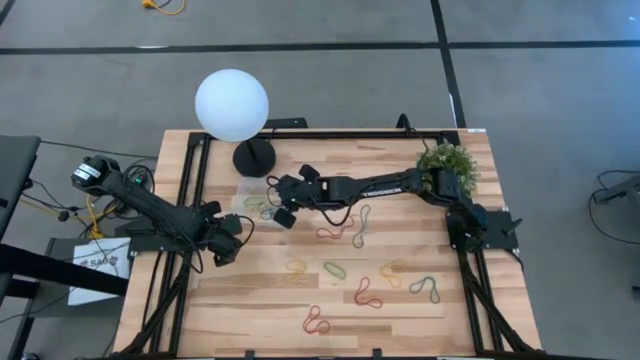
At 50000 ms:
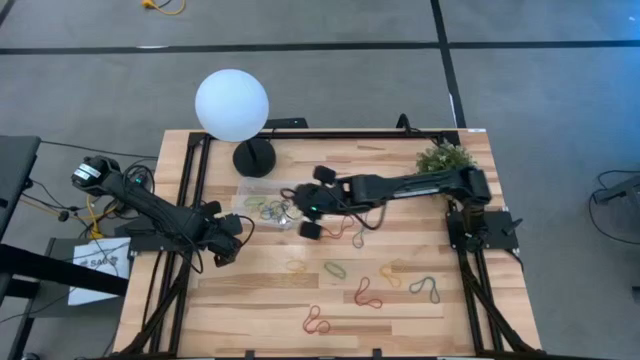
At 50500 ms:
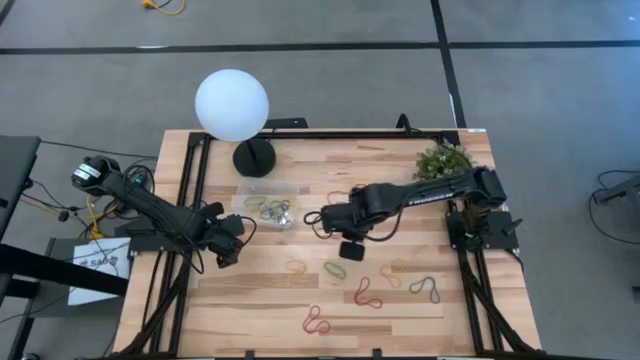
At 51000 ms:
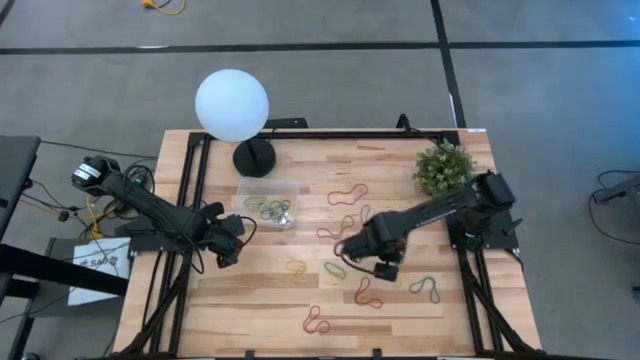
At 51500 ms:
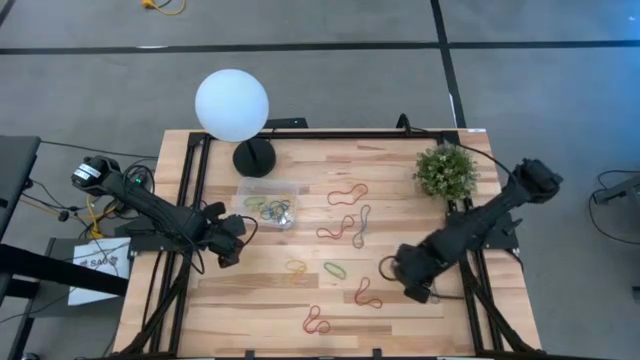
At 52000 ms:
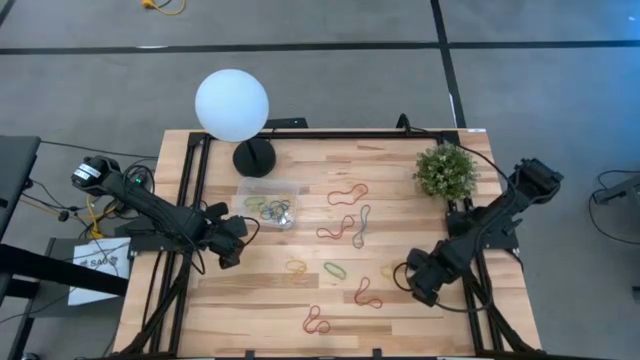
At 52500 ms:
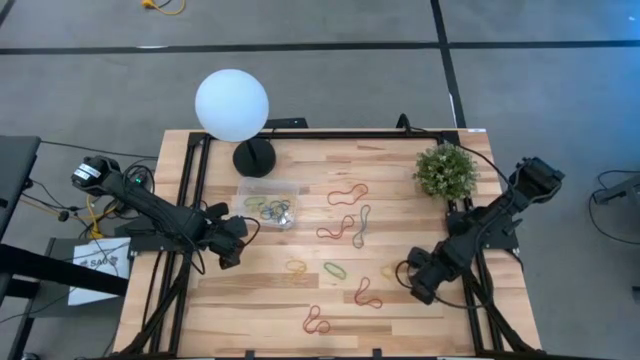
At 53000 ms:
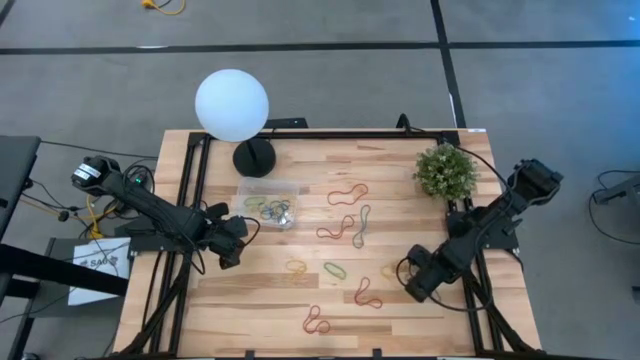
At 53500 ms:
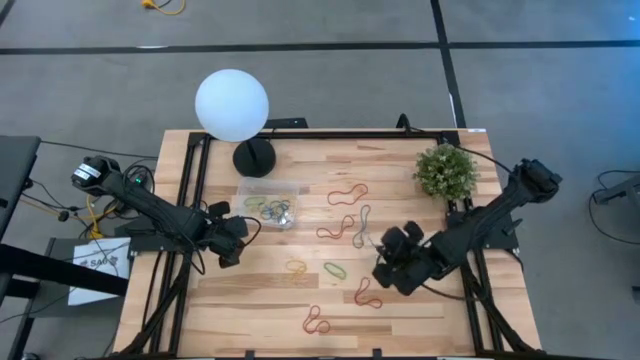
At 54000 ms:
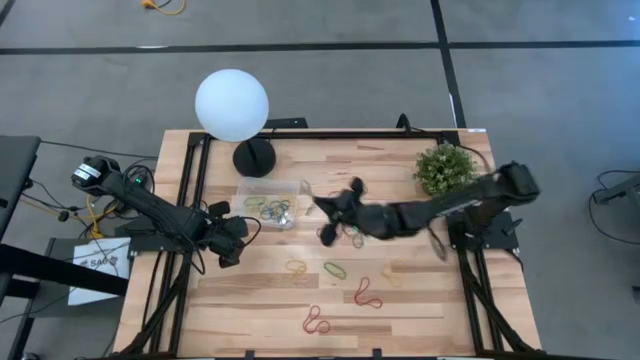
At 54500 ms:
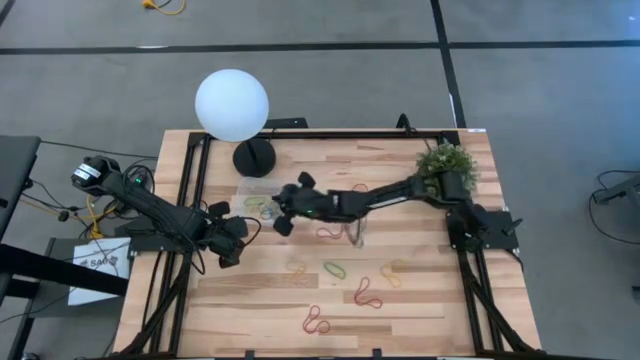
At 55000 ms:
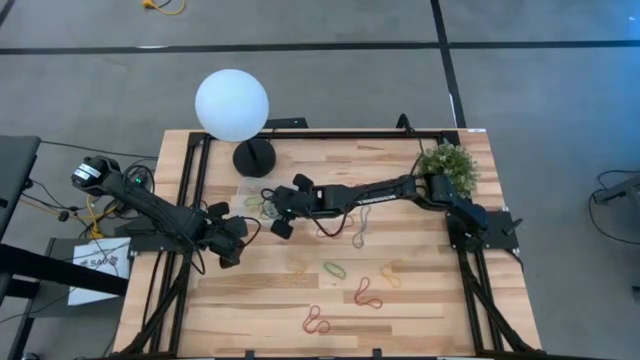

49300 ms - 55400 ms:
Task: Pick and place rubber bands into bin
Put the blue rubber band into the transparent container

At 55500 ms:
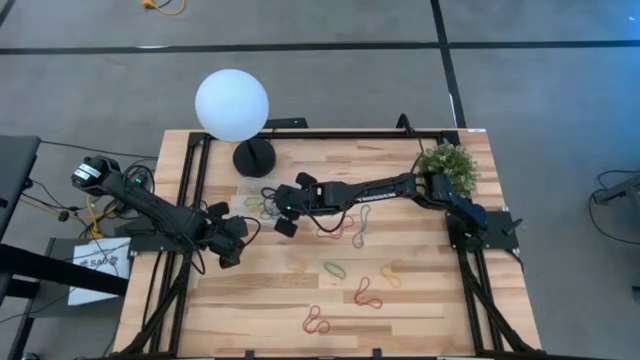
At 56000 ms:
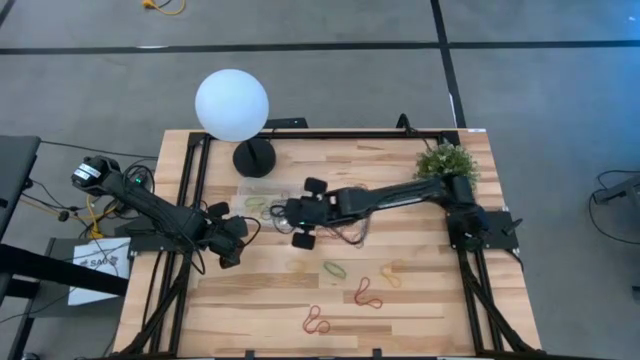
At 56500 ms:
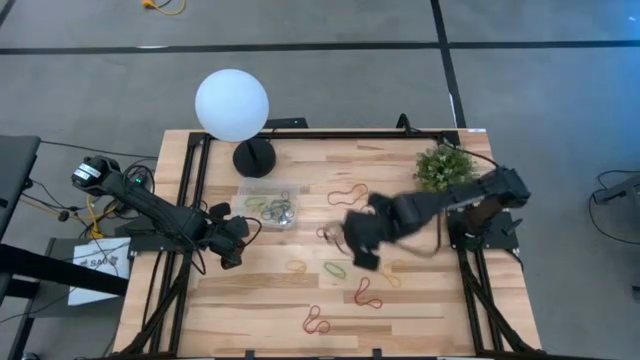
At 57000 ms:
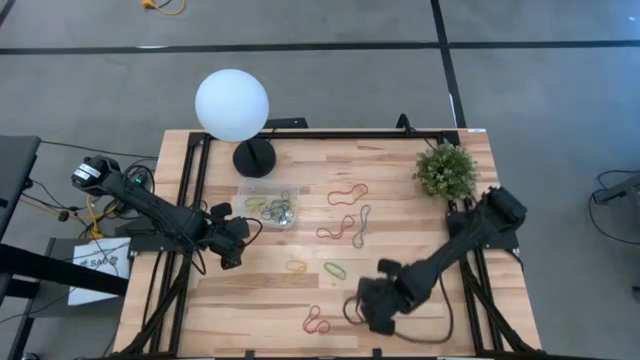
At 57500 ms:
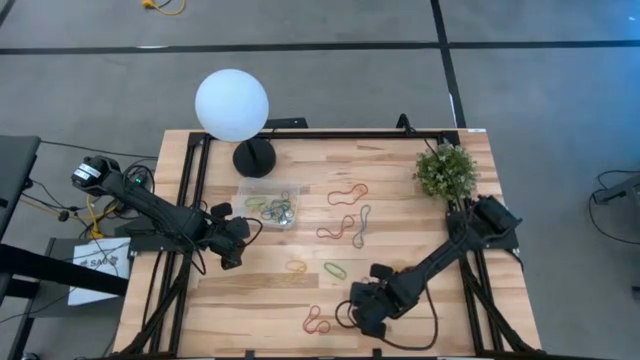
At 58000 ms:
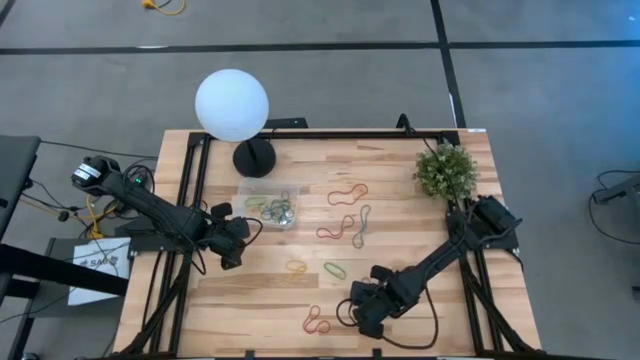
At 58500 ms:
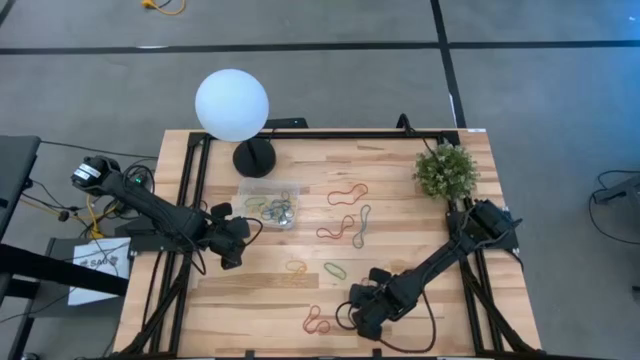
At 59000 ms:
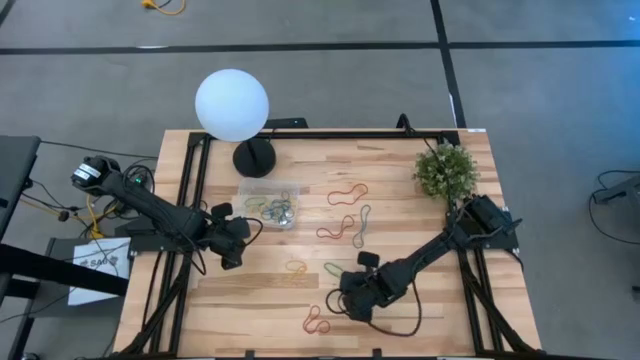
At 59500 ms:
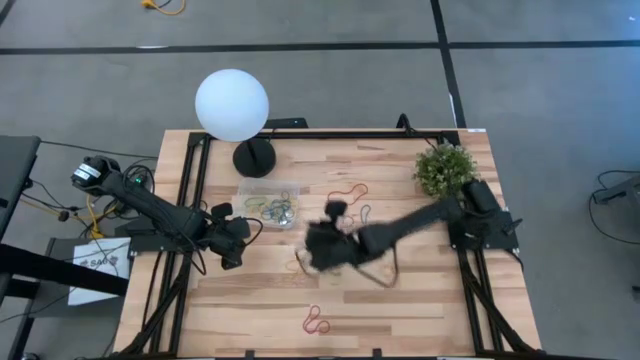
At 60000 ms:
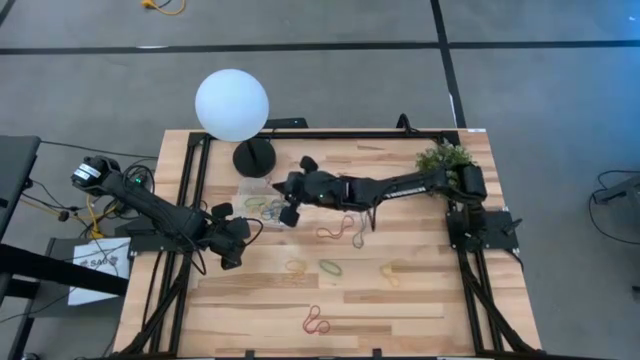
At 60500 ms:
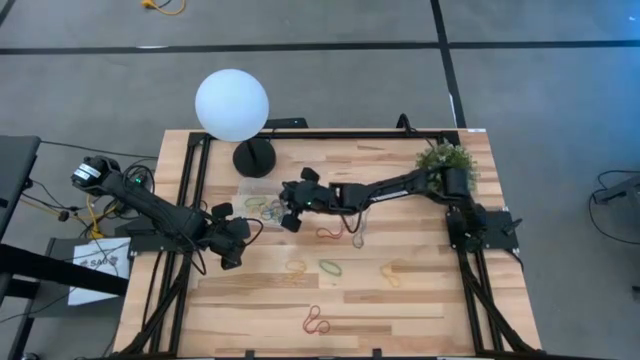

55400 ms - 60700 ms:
Put the red rubber band into the transparent container

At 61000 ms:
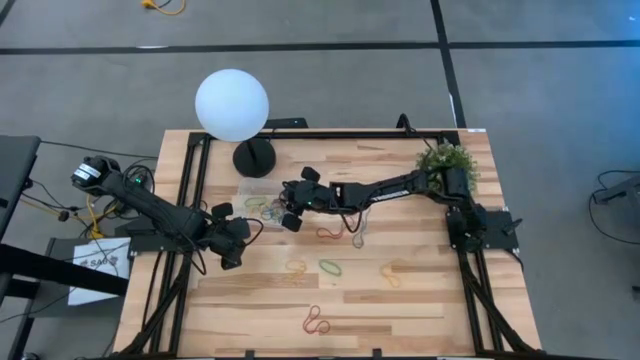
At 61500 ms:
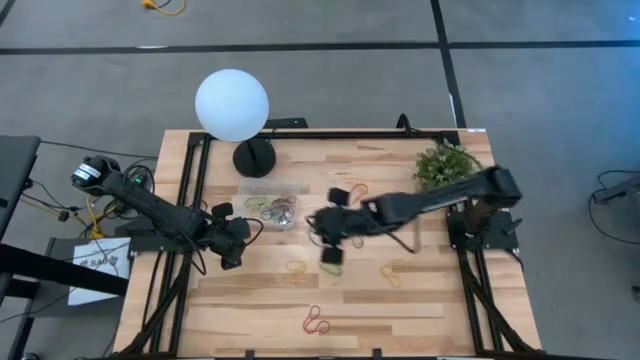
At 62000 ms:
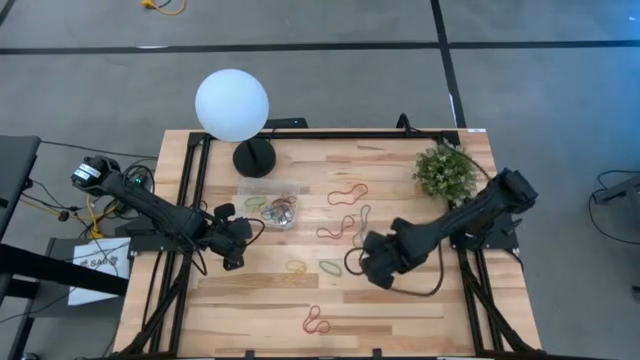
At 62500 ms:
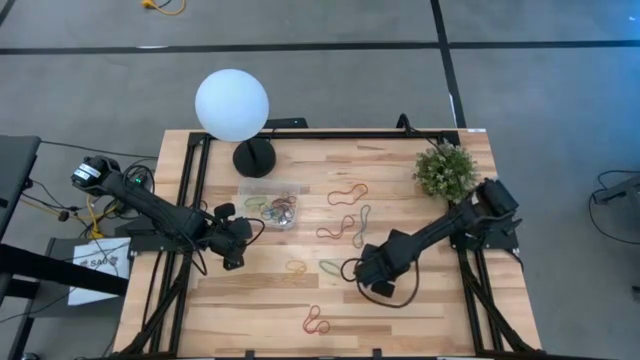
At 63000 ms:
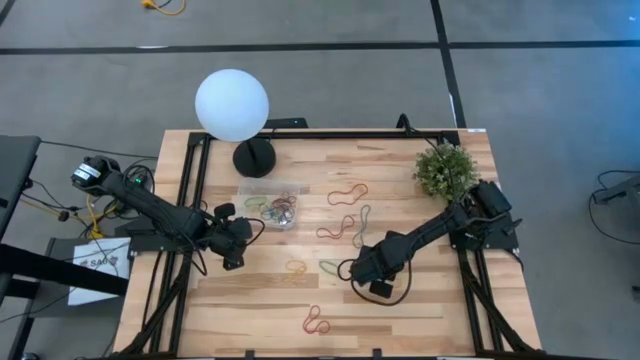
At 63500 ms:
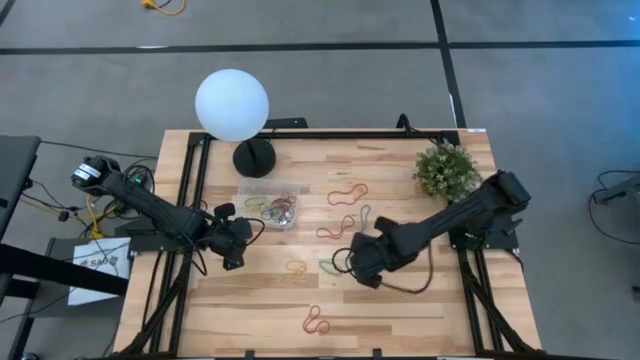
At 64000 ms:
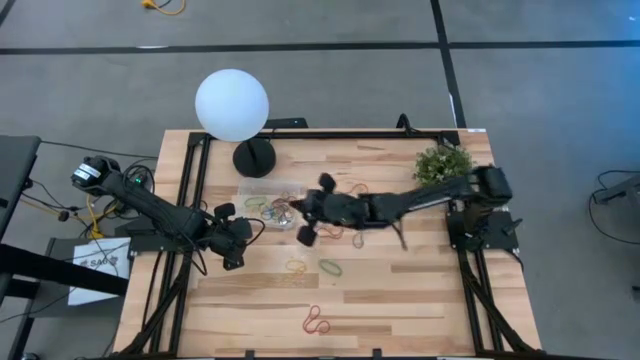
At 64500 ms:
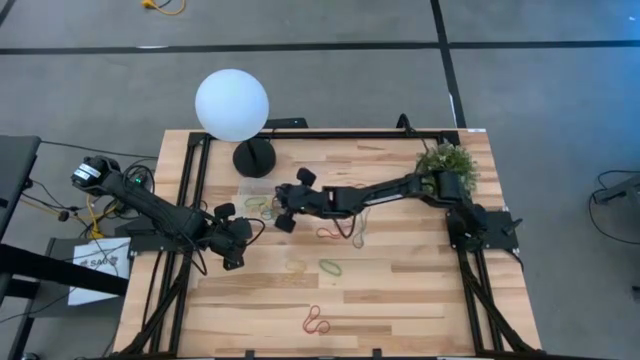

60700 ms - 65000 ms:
Put the yellow rubber band into the transparent container

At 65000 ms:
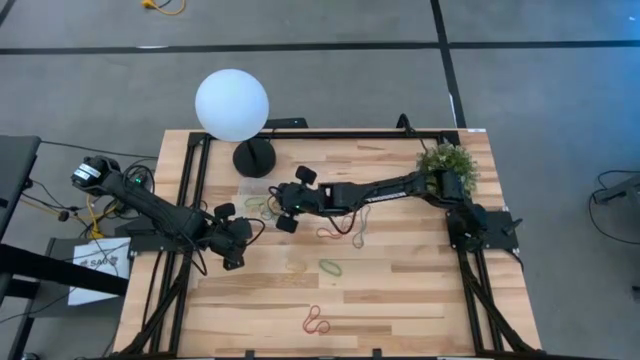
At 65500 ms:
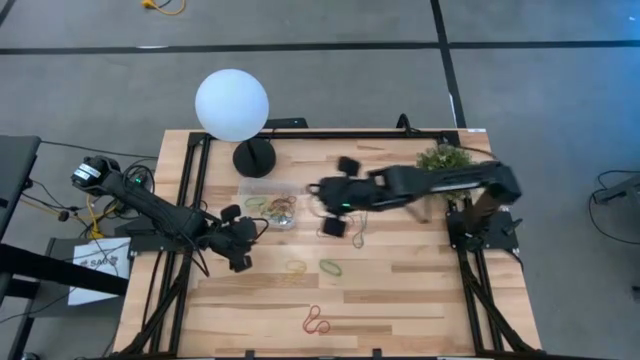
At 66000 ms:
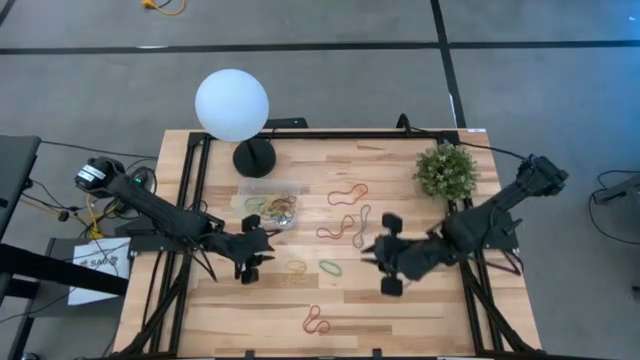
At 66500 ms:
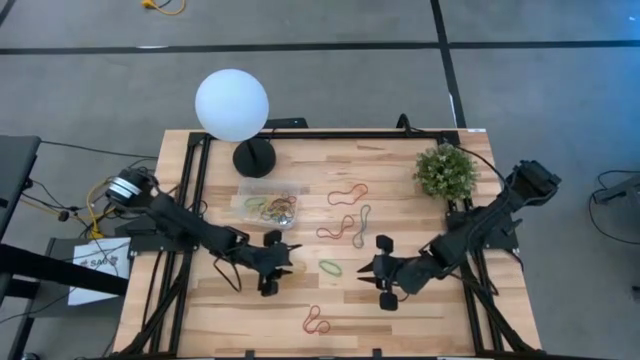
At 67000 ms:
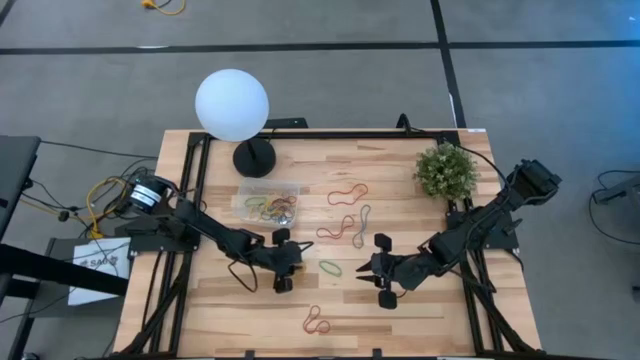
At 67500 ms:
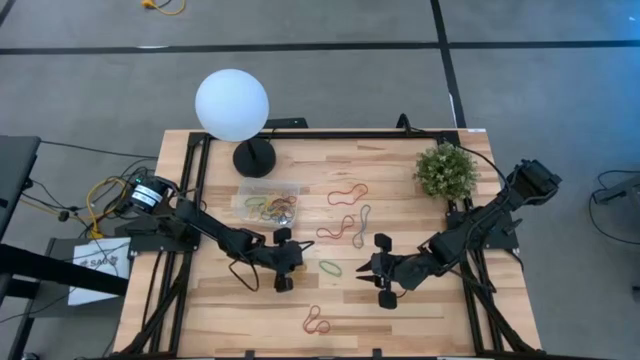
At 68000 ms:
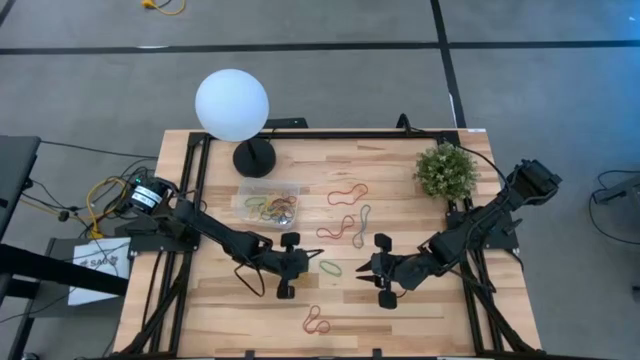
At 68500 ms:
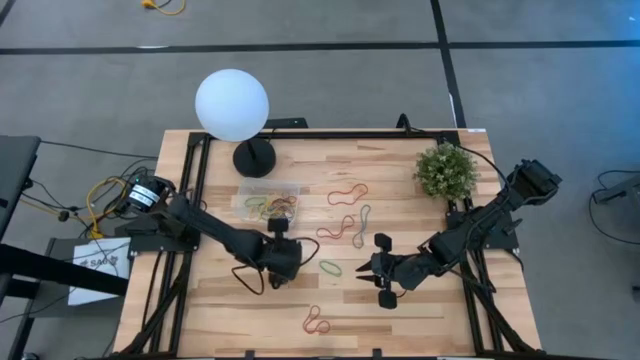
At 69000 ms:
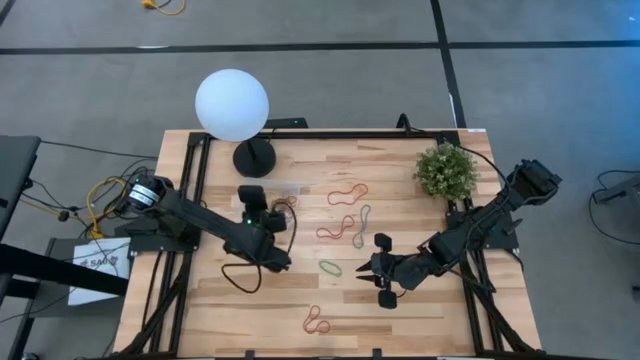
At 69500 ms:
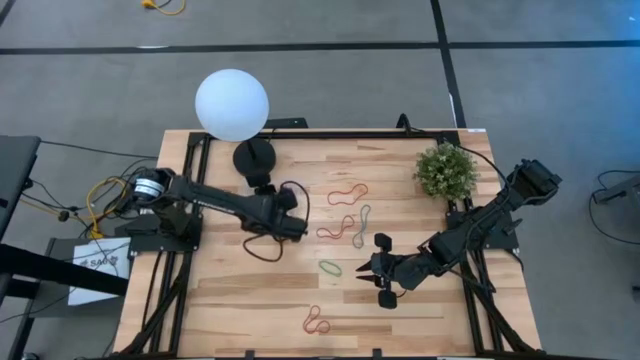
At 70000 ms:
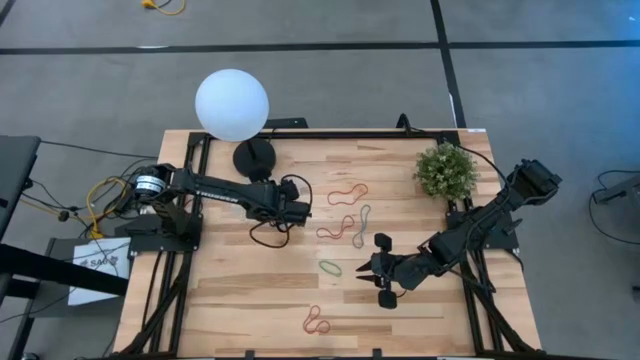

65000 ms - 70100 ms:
Put the yellow rubber band into the transparent container

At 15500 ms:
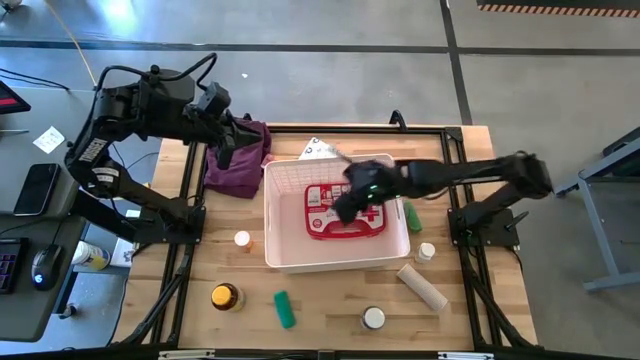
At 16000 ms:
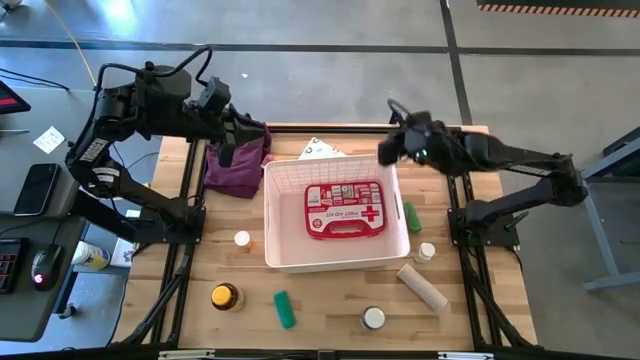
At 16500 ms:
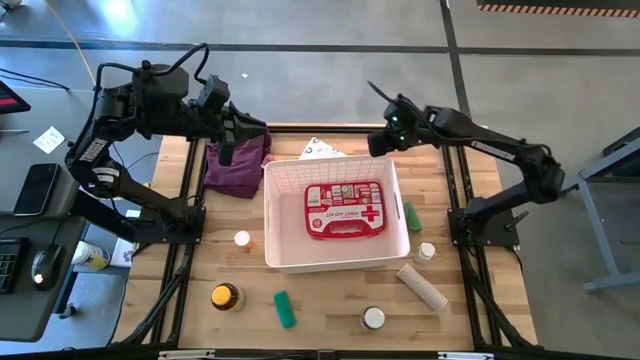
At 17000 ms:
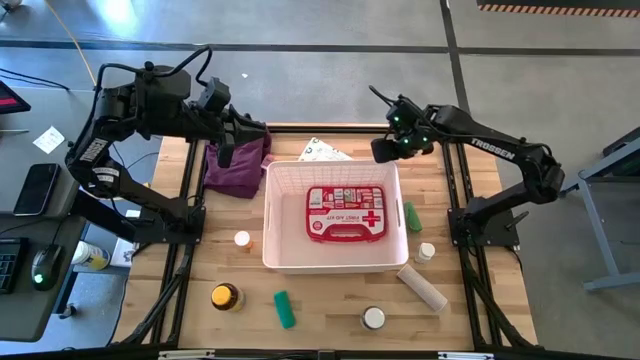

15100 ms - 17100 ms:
Task: Pick & place medical supplies in basket/bin
Adjust the white bin
